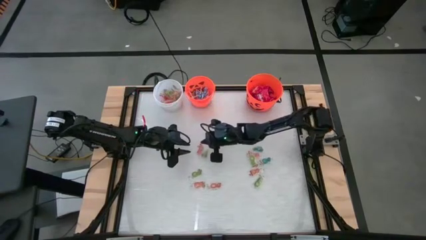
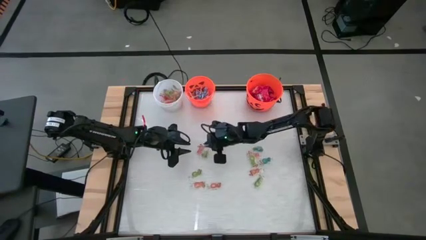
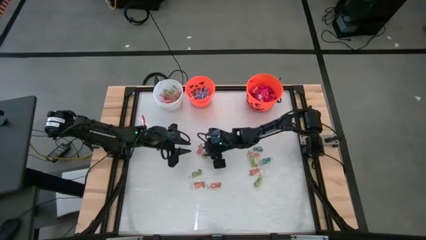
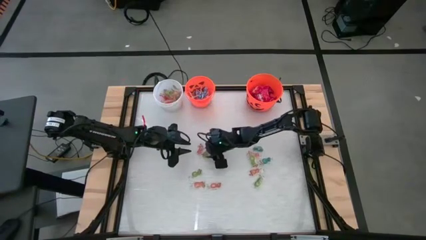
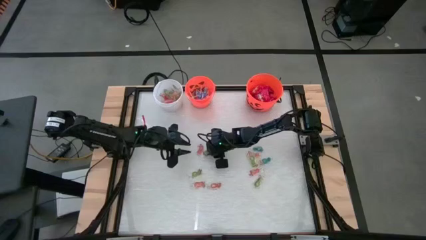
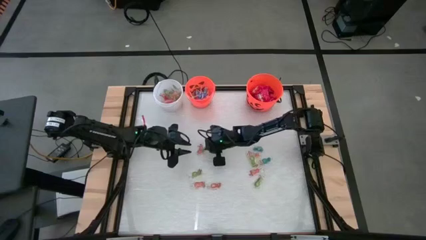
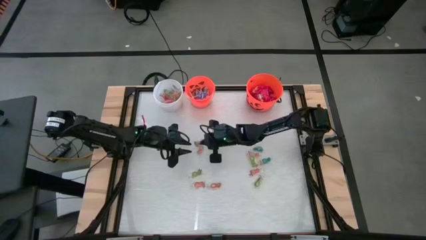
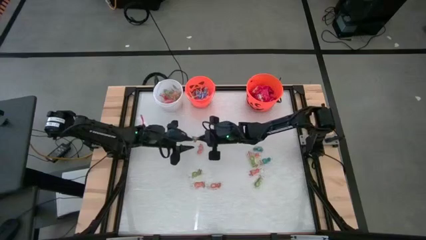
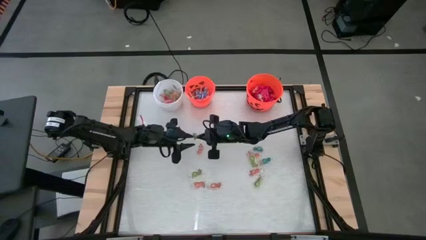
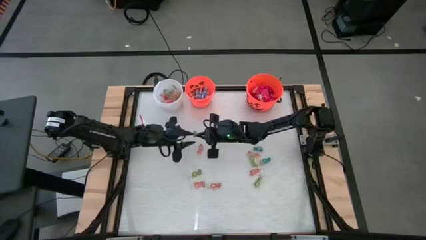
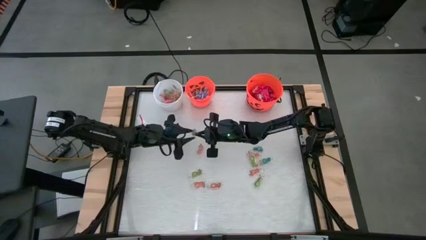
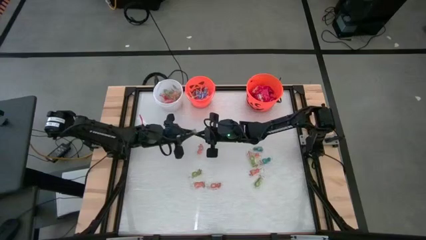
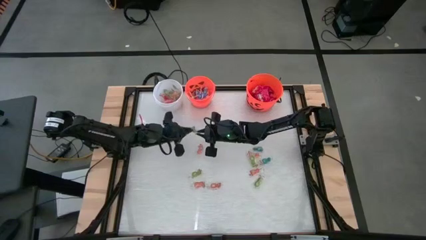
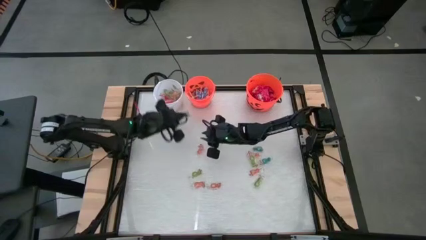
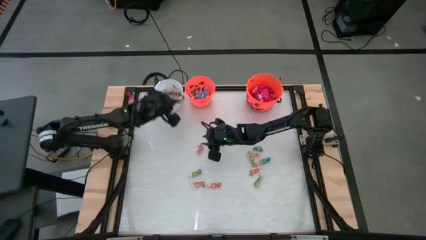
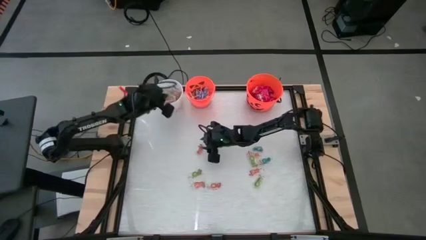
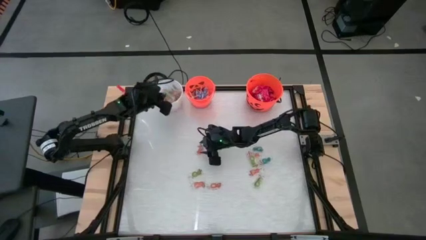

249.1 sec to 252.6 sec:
Task: Sort candy by brand, put in halloween buckets
Put the green gummy into the white bucket

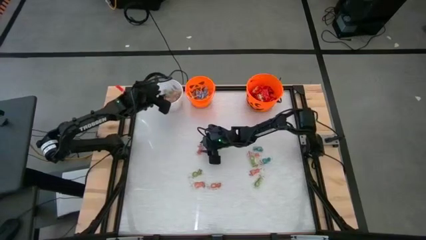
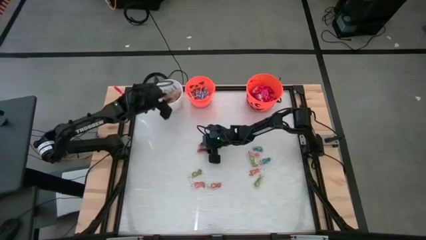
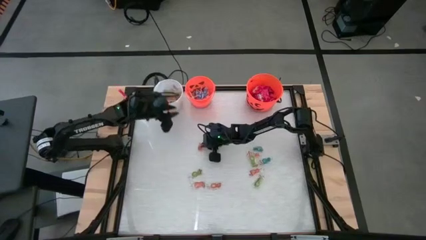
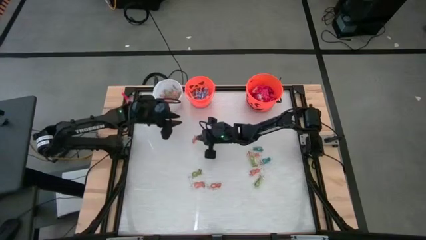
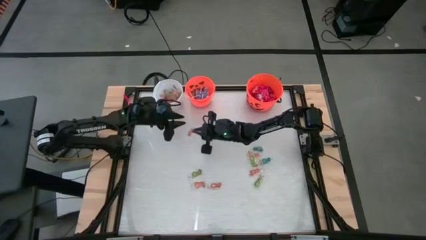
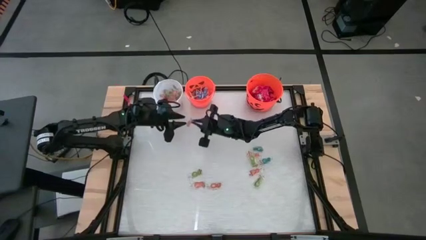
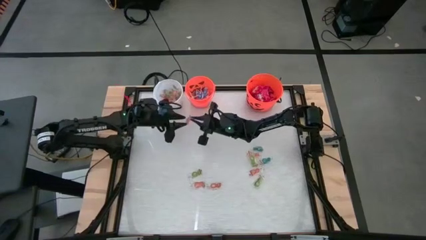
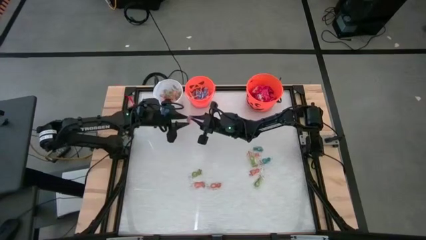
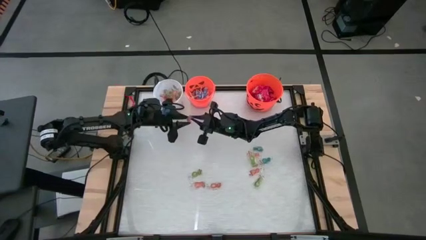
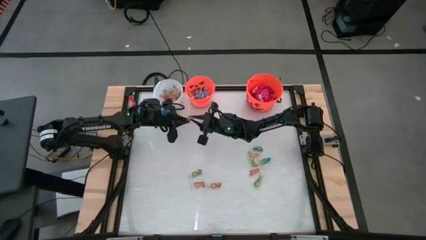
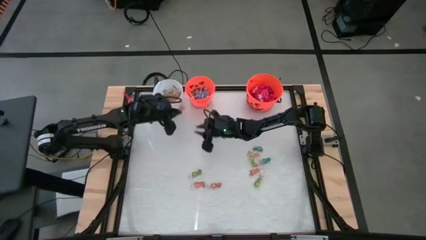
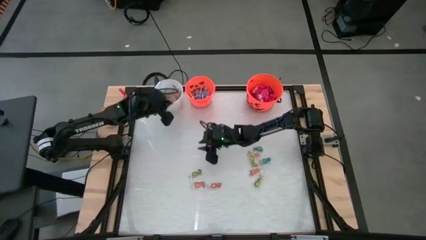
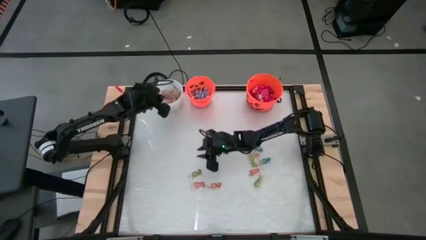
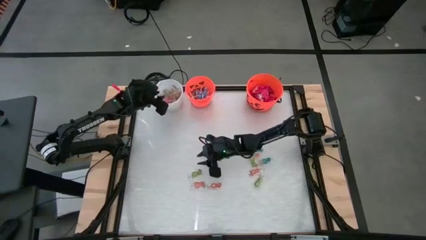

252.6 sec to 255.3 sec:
Put the orange gummy into the white bucket

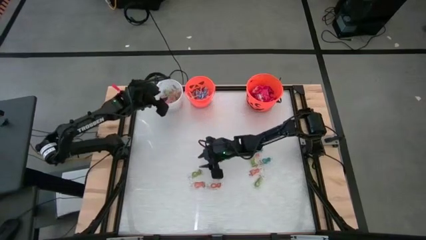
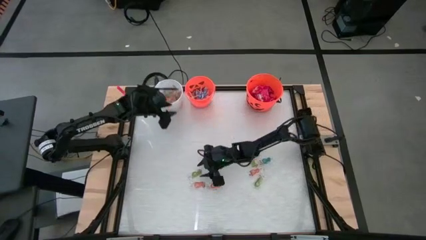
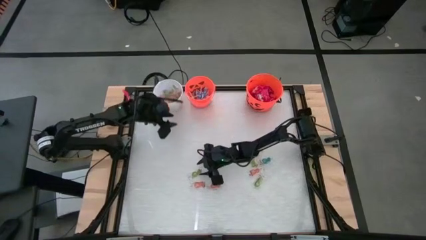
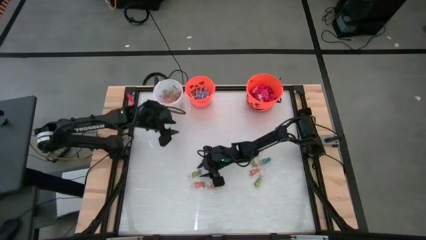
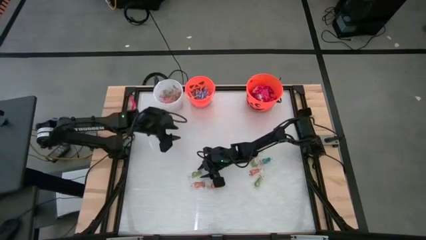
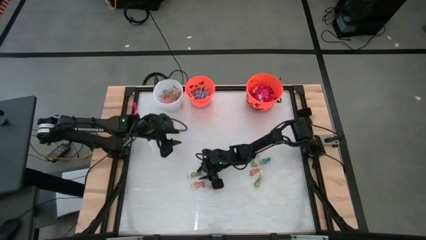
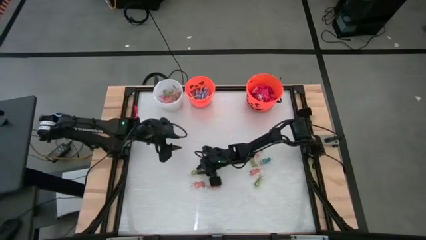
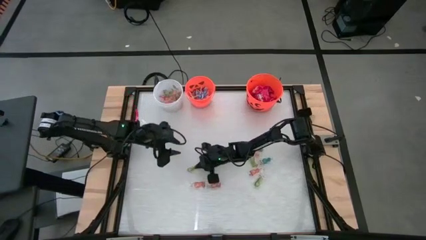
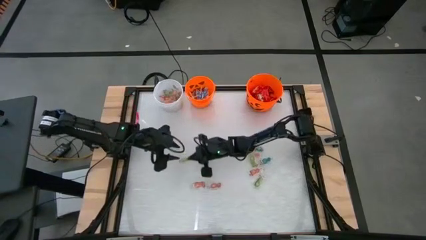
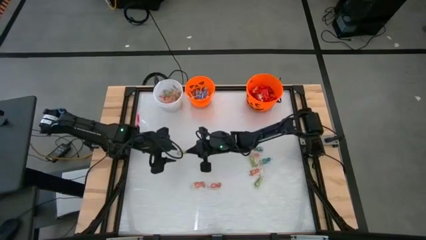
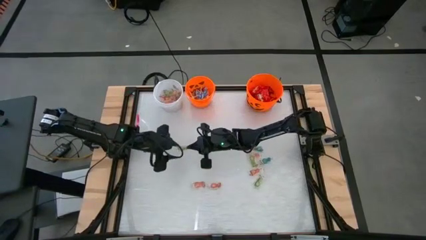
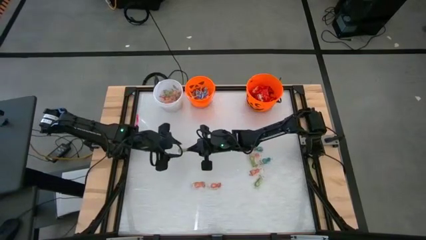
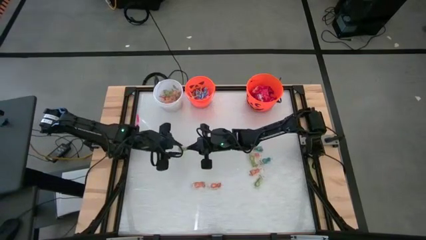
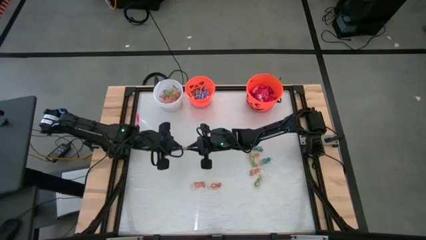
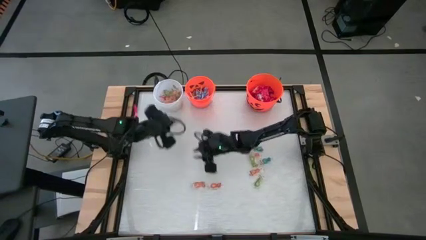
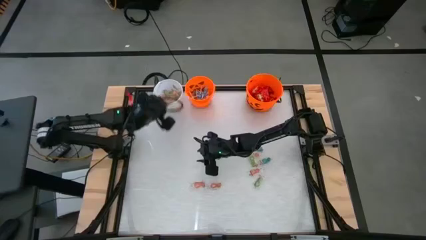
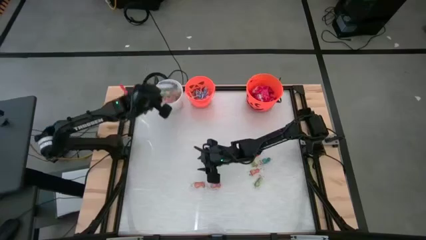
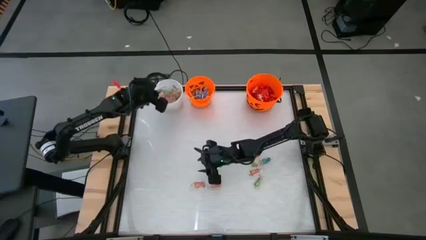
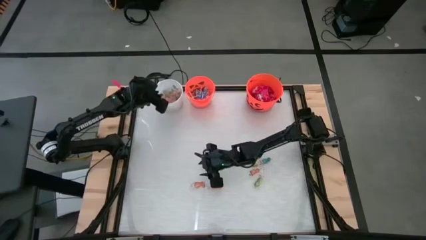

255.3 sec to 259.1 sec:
Put the green gummy into the white bucket

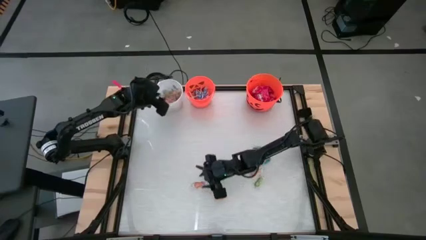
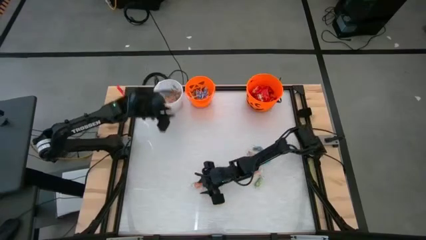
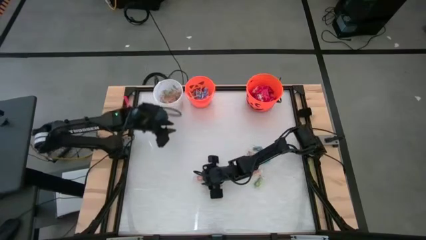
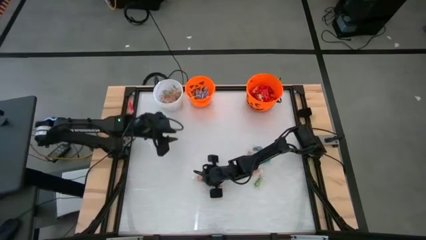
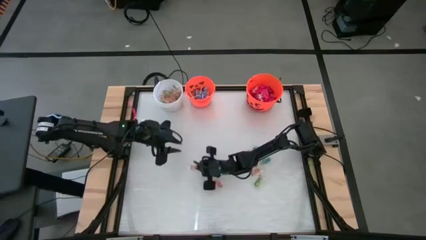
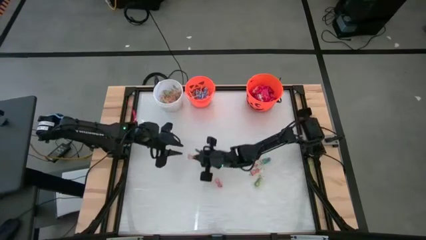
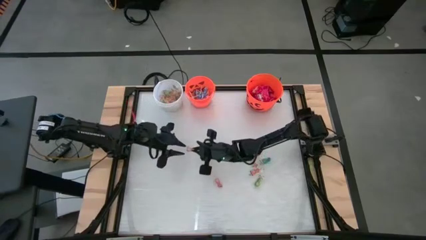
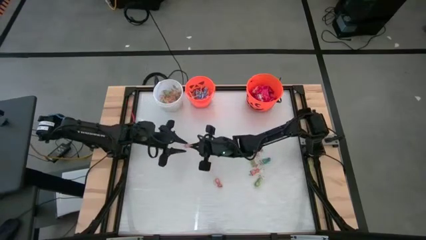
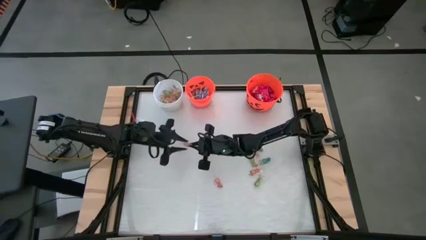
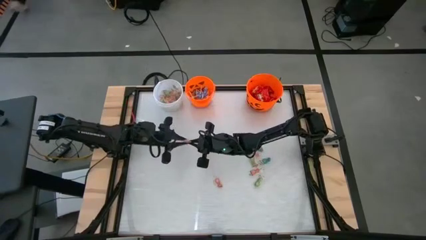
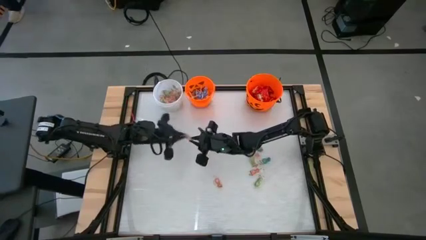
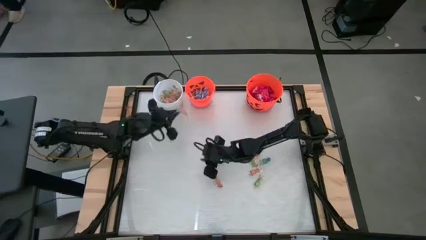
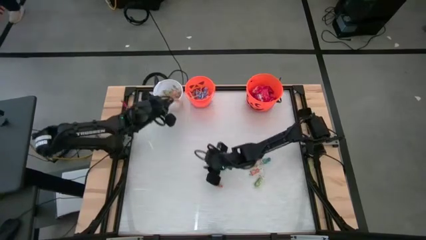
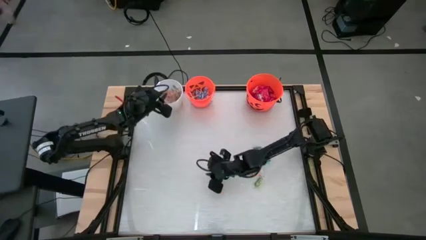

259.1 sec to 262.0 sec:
Put the orange gummy into the white bucket

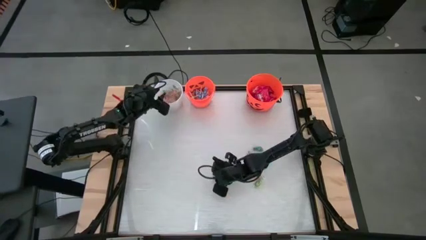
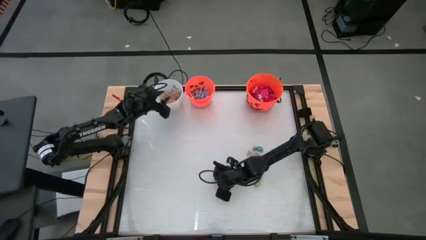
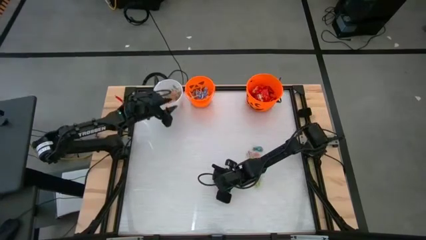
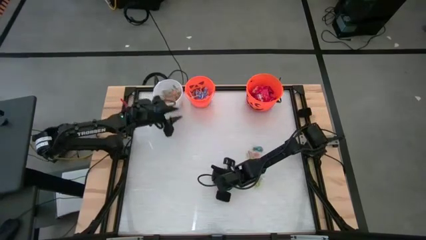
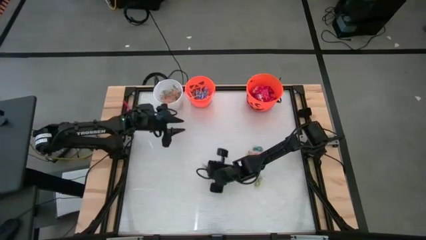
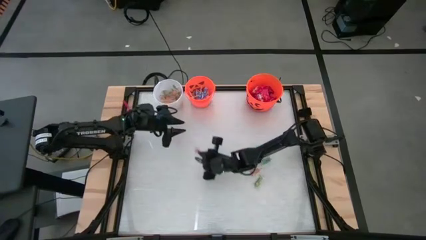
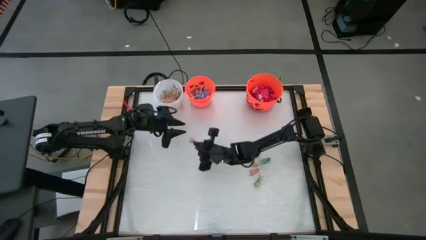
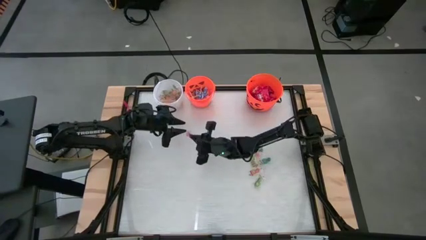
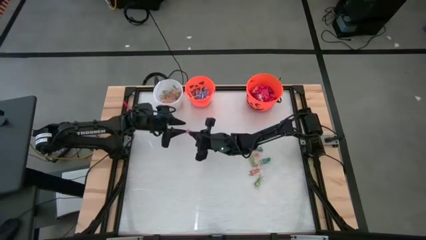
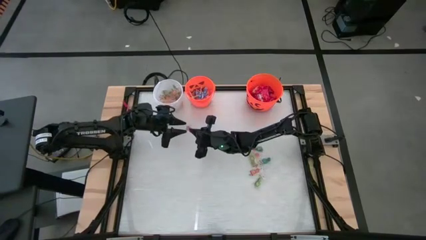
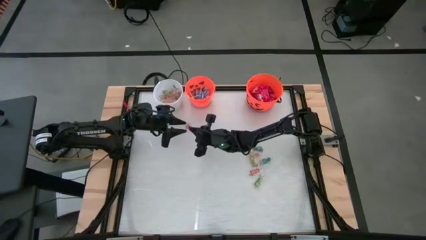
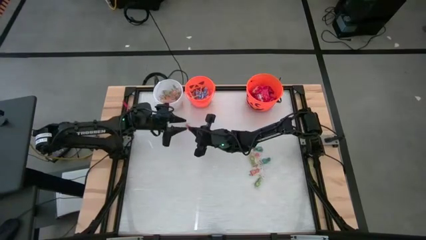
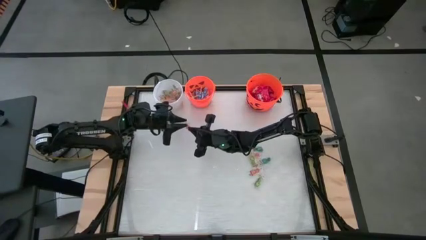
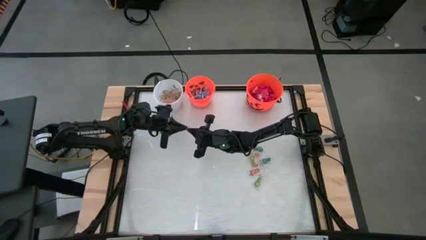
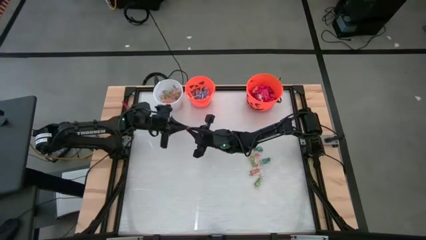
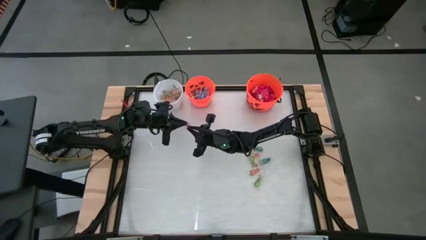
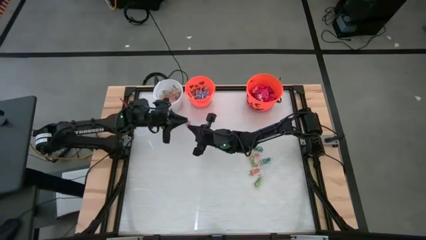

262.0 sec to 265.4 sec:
Put the orange gummy into the white bucket

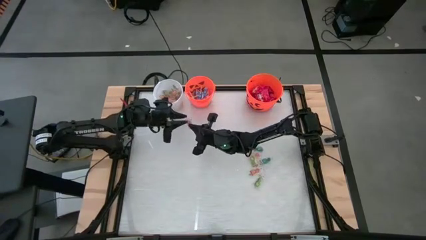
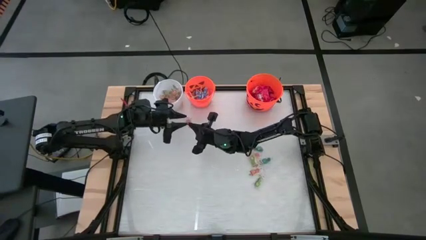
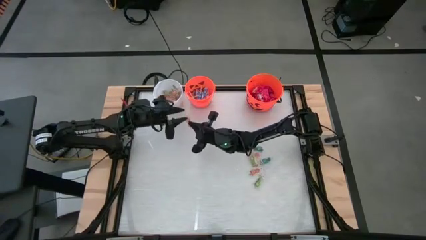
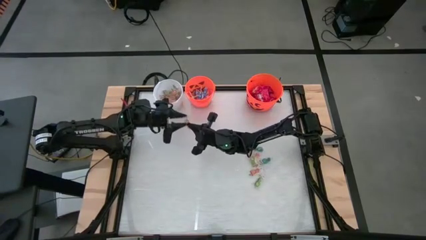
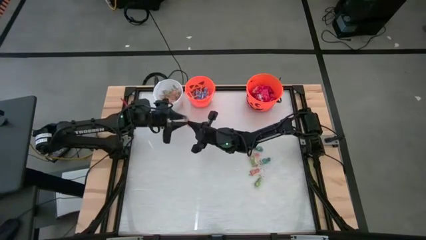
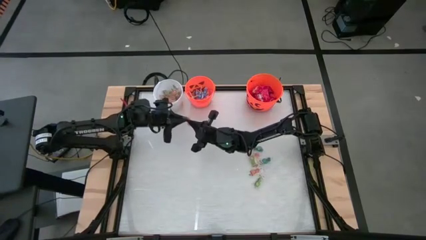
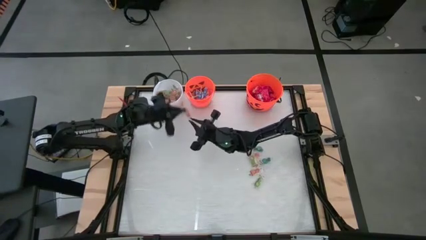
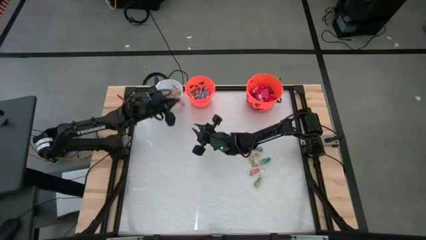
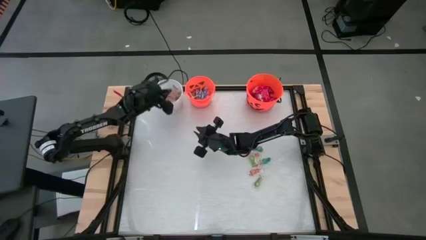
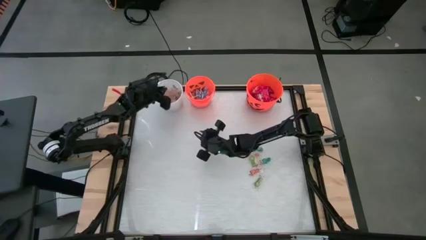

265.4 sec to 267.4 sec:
Put the orange gummy into the white bucket
